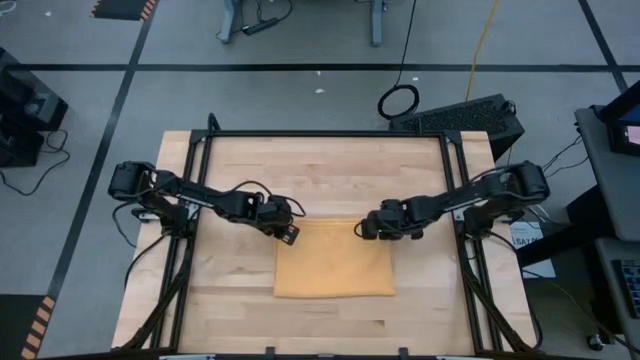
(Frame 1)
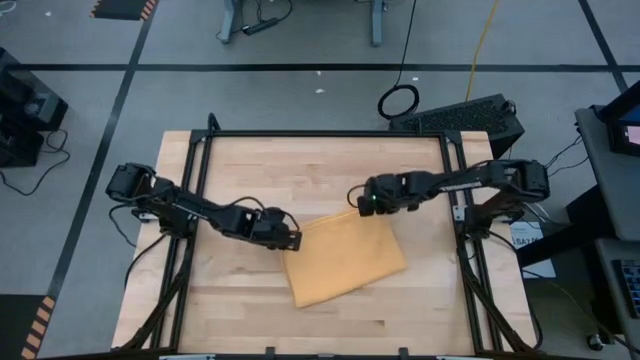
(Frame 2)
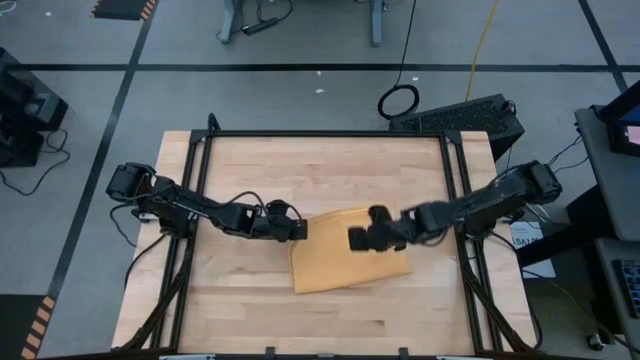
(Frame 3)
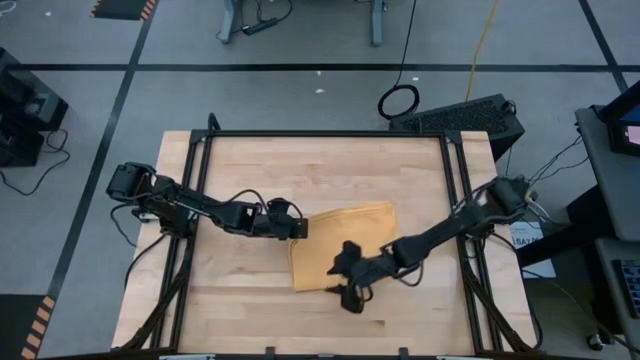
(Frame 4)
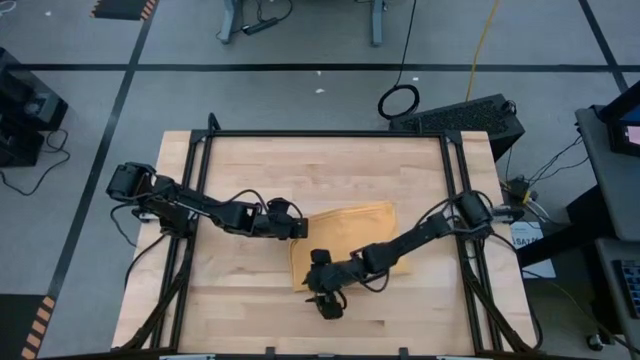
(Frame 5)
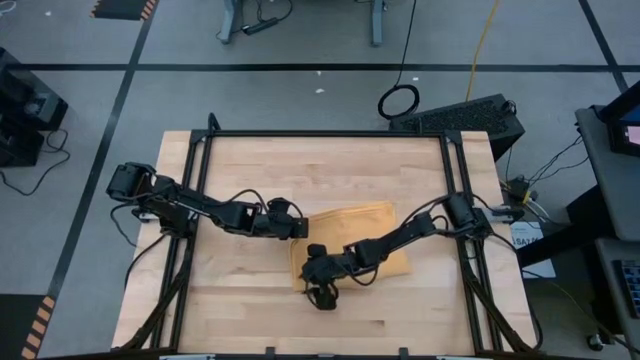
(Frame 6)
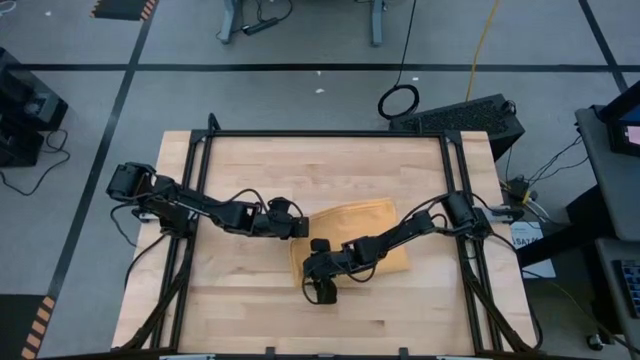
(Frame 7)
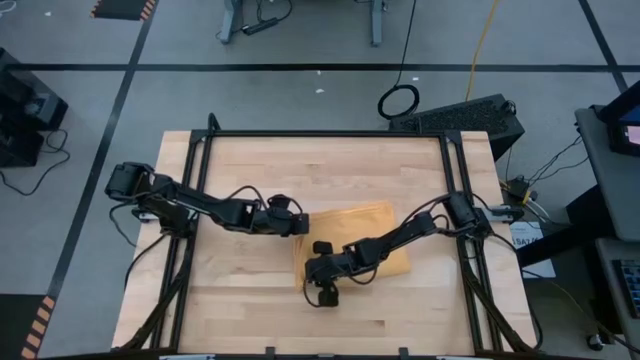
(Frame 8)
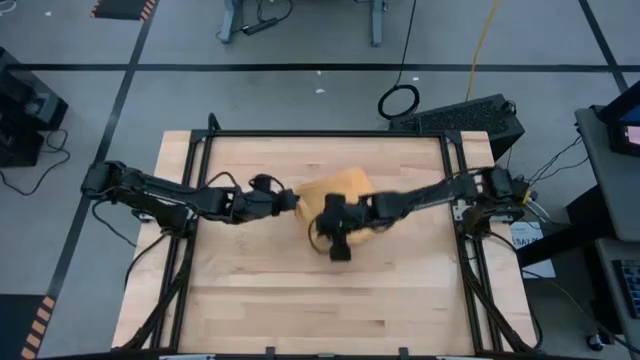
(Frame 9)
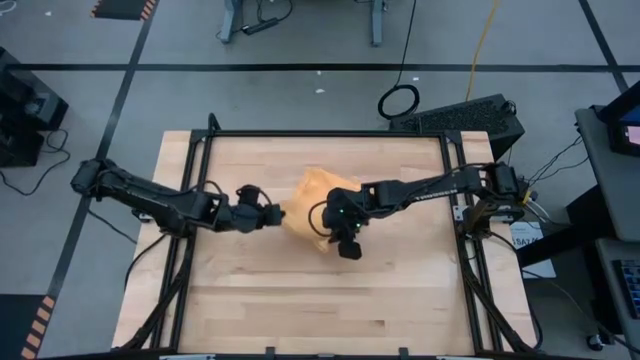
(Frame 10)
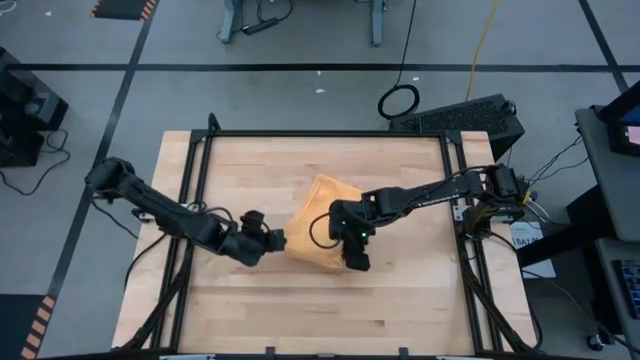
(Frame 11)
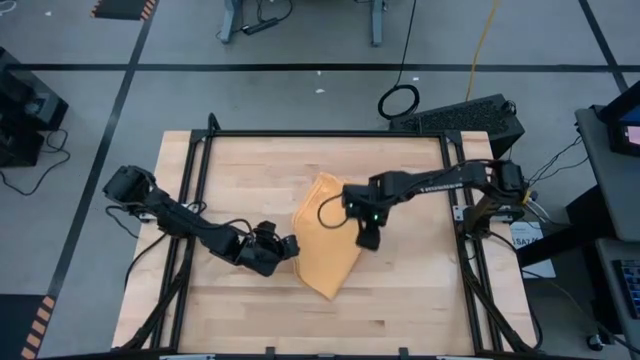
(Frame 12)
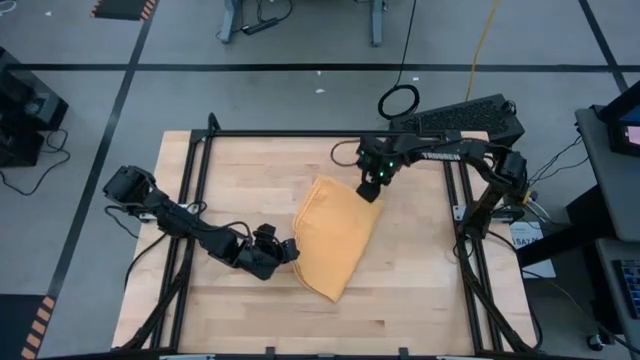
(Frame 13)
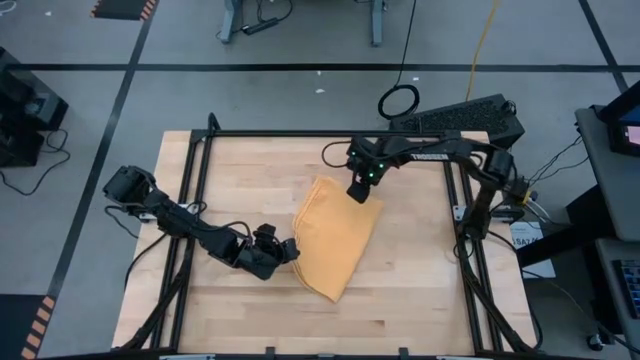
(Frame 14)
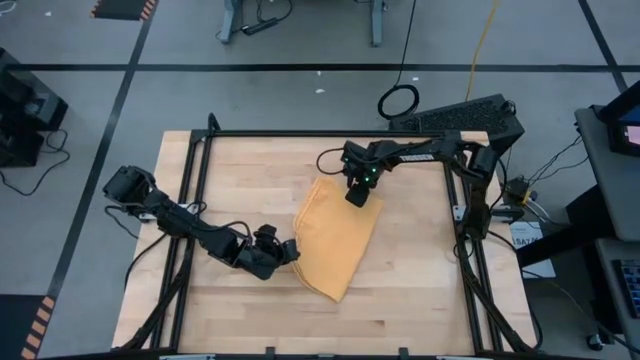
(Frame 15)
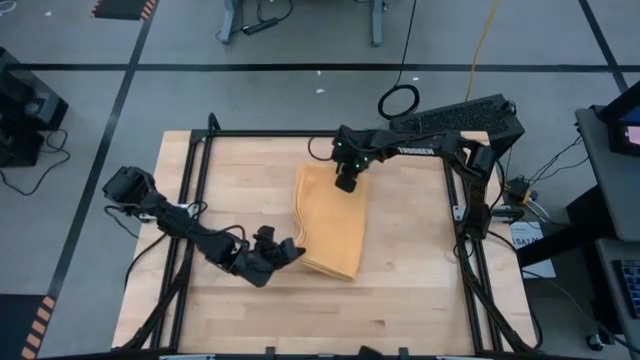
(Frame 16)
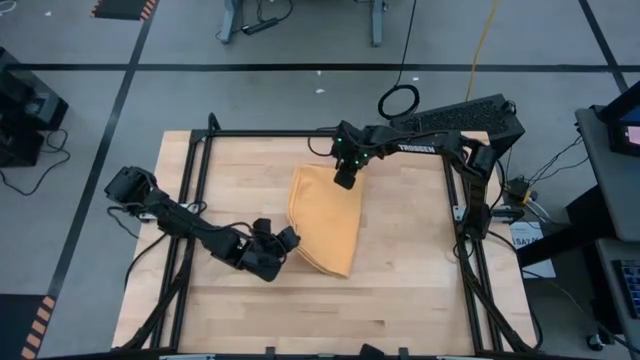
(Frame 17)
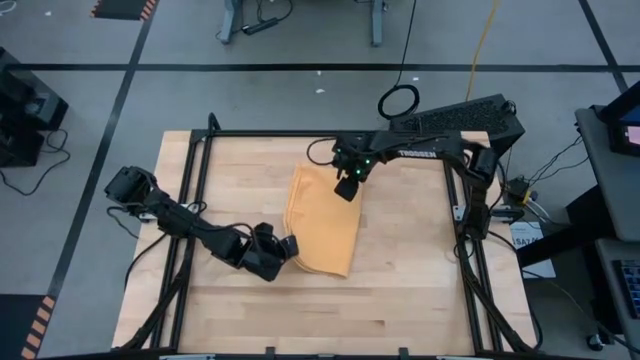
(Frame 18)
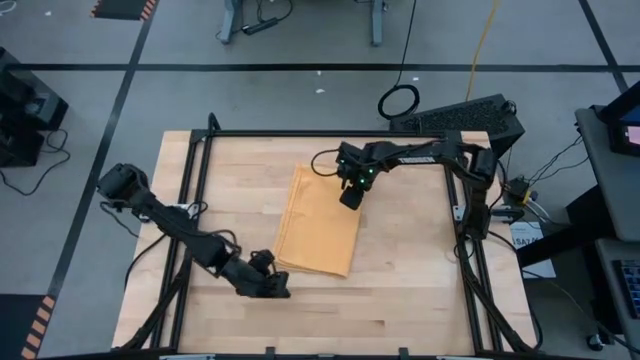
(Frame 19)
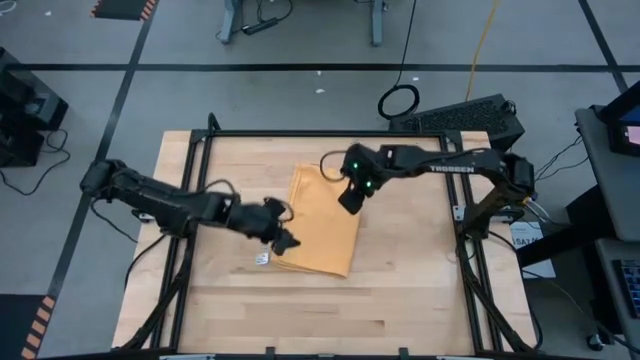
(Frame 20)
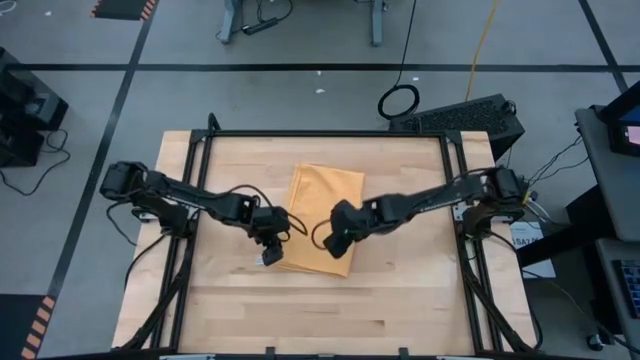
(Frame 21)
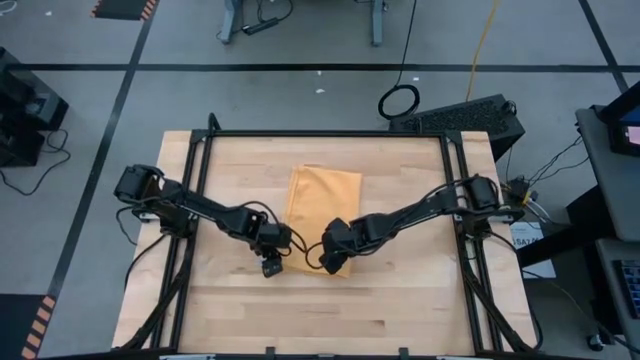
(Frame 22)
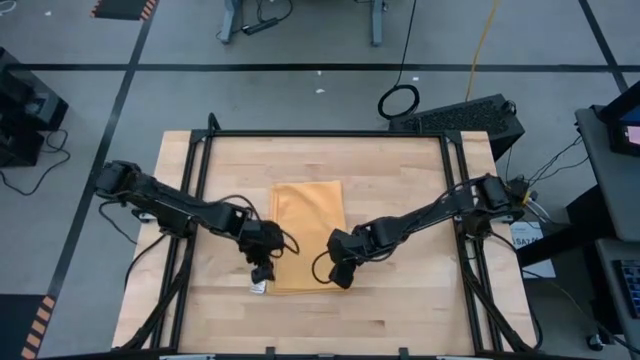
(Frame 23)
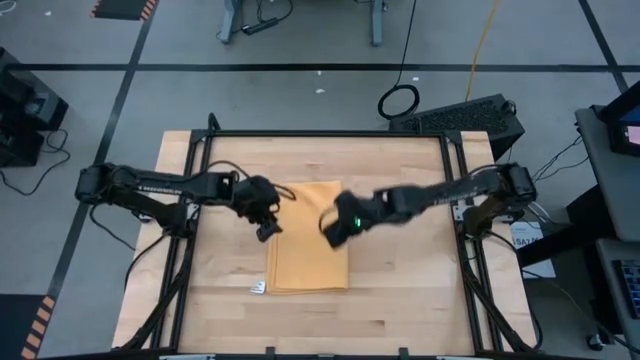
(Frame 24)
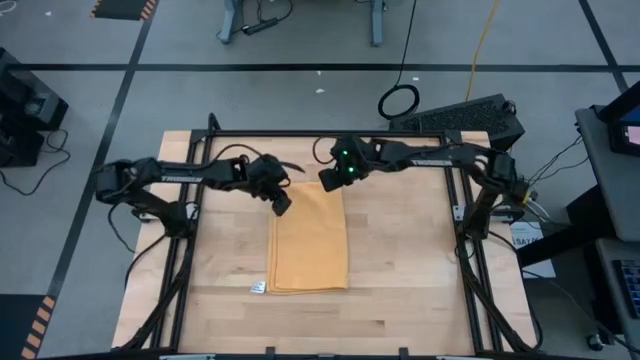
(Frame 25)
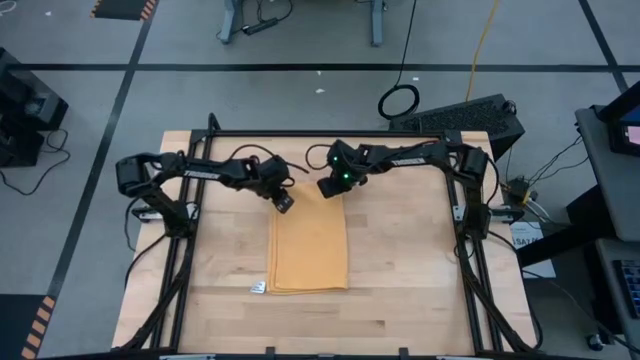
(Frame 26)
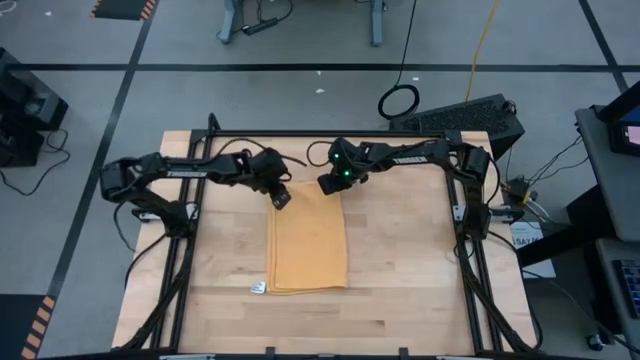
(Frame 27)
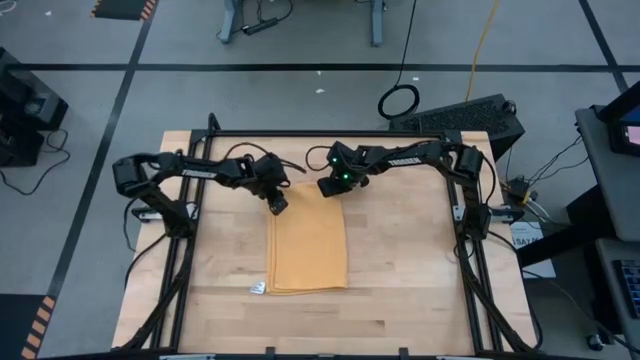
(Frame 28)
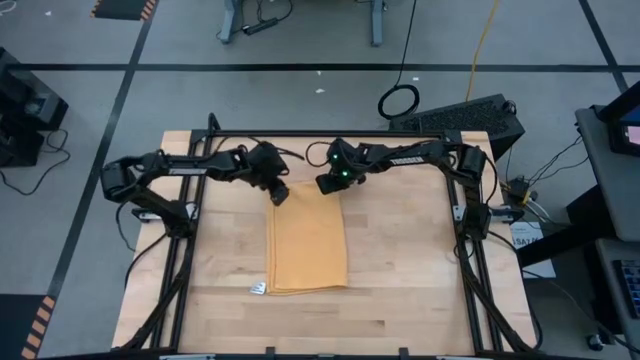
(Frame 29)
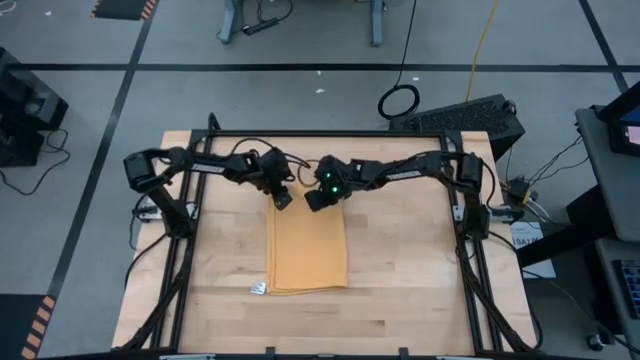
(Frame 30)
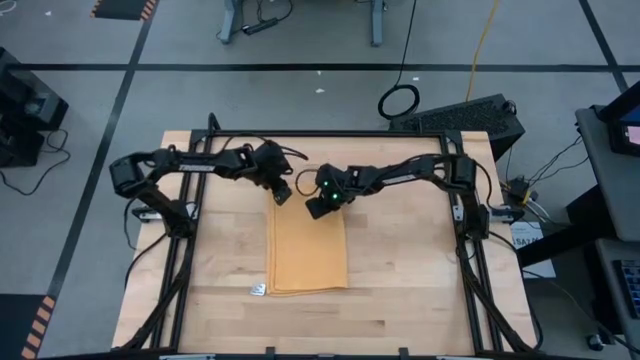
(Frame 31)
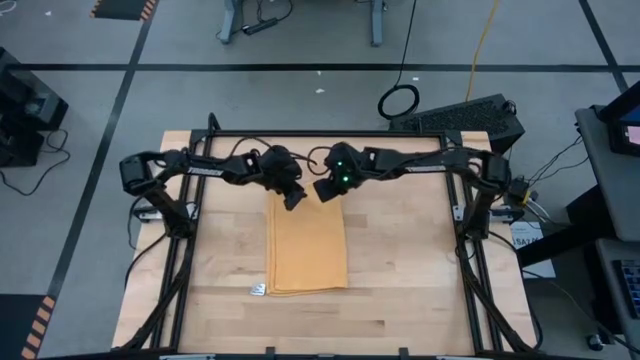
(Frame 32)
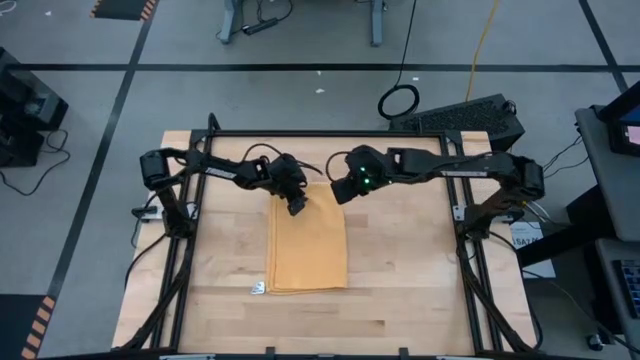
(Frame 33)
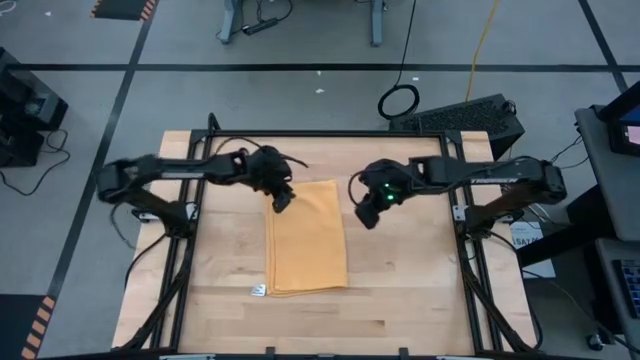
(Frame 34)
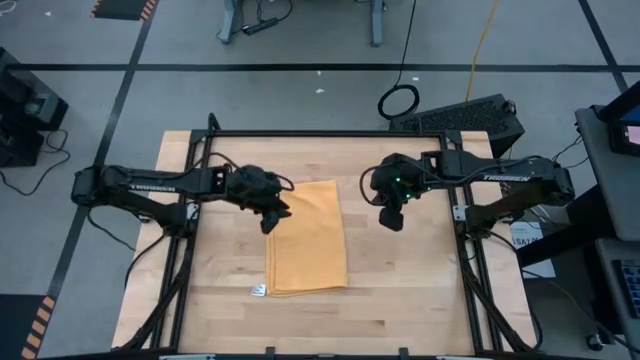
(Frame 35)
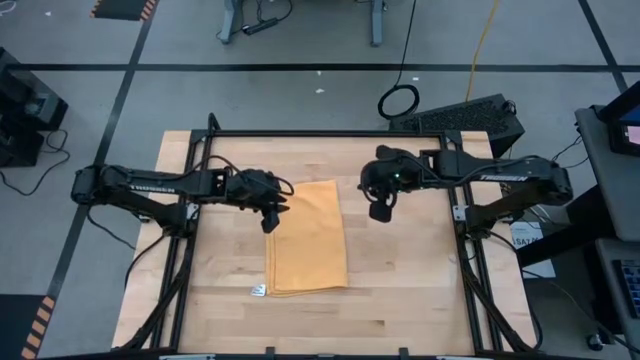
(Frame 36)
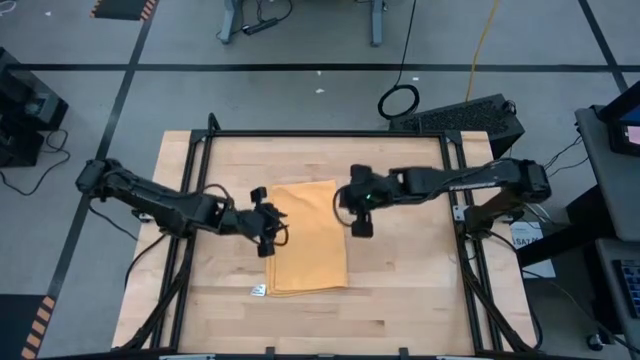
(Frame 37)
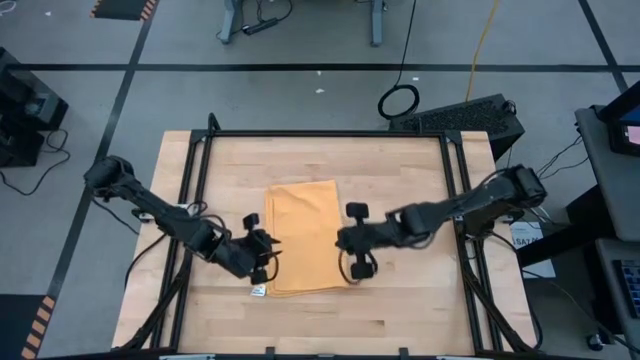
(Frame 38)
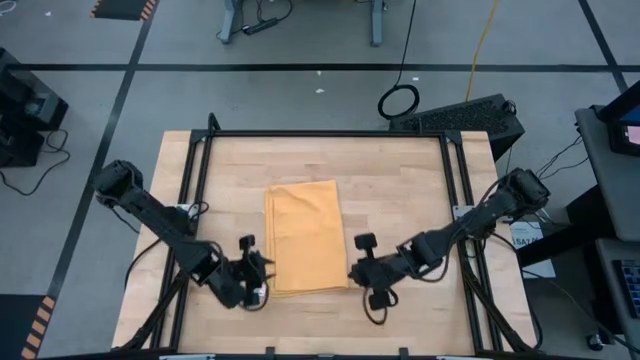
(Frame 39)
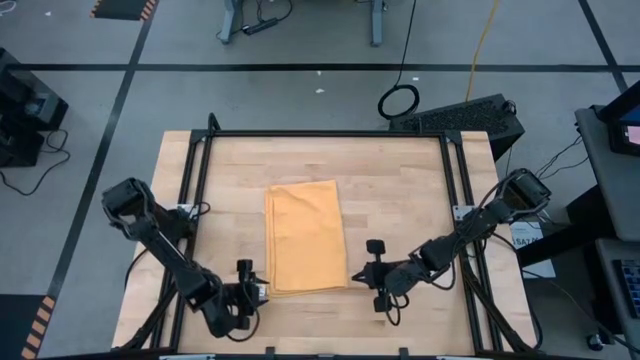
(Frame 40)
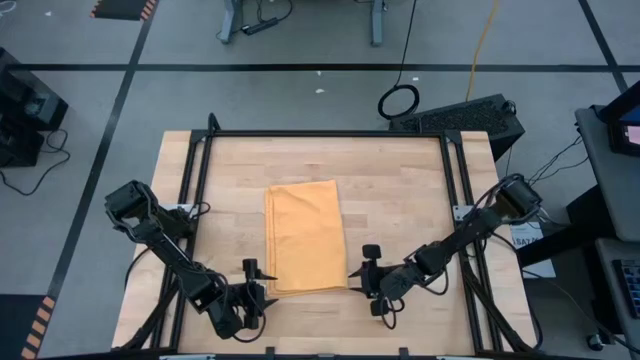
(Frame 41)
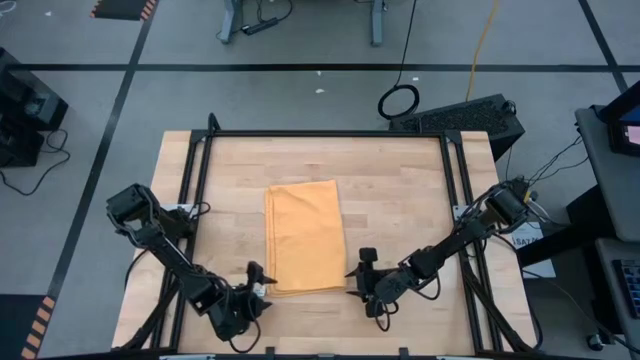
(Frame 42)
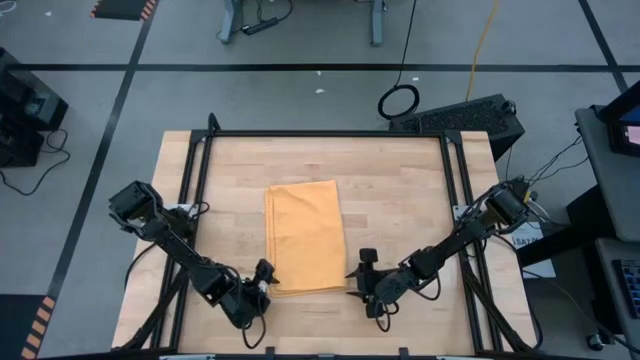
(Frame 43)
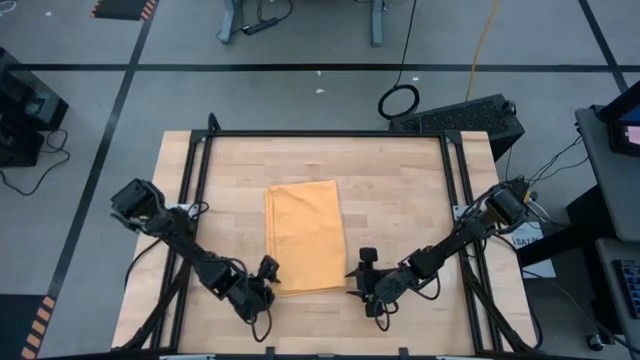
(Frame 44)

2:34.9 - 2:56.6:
Task: Roll towel
Fold the yellow towel in
